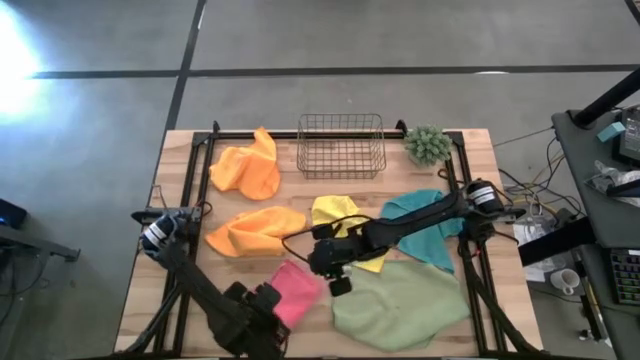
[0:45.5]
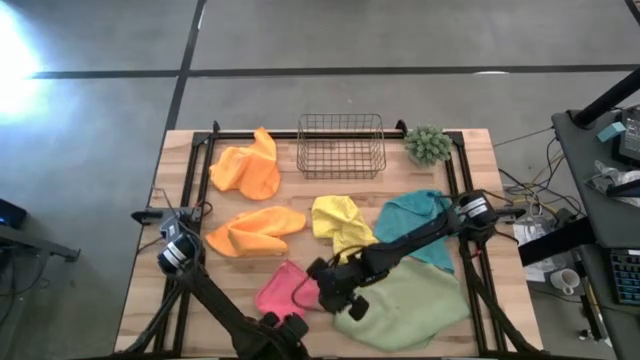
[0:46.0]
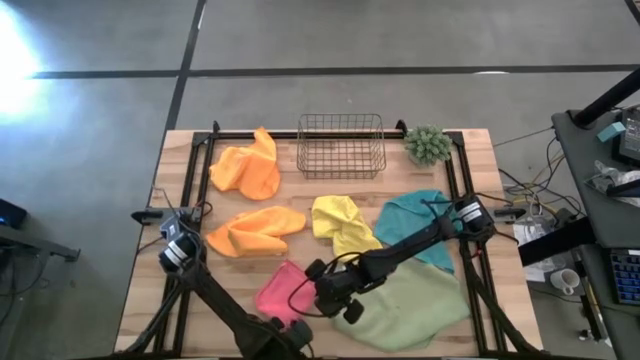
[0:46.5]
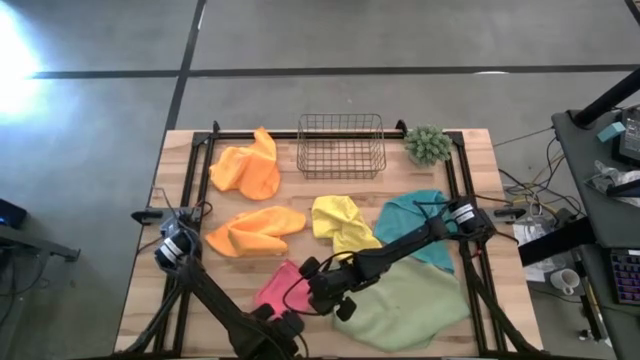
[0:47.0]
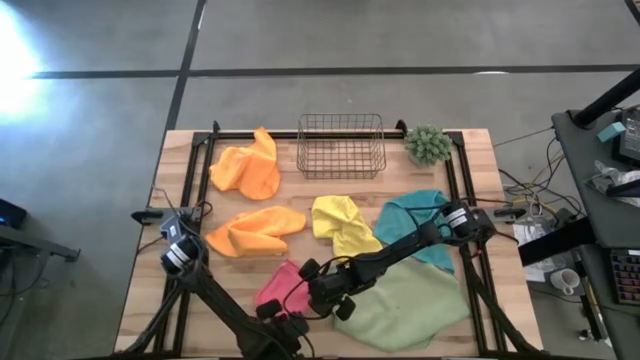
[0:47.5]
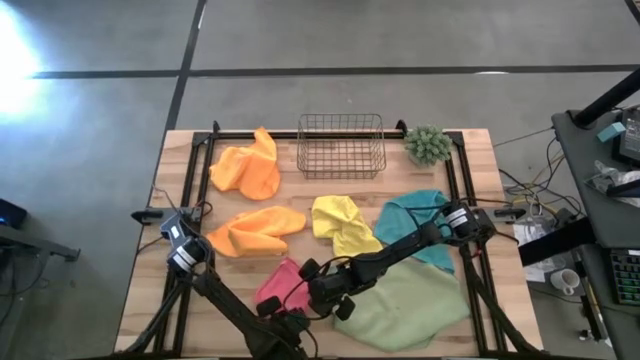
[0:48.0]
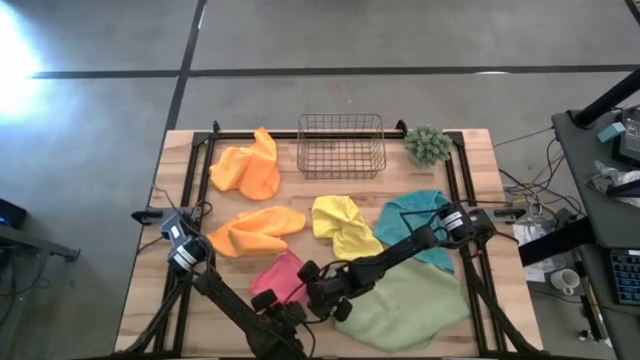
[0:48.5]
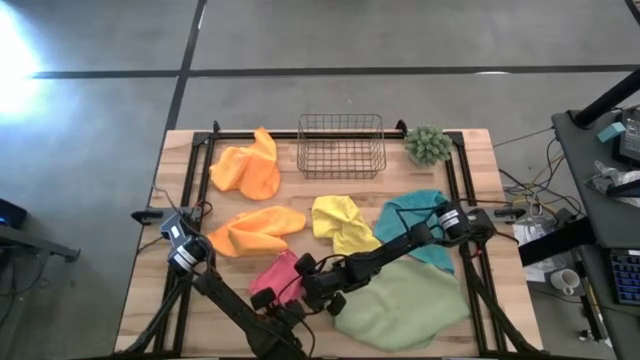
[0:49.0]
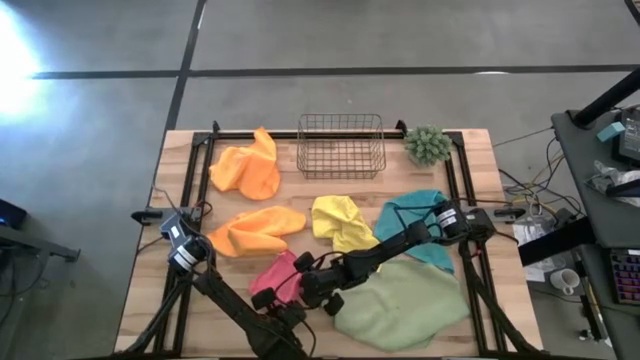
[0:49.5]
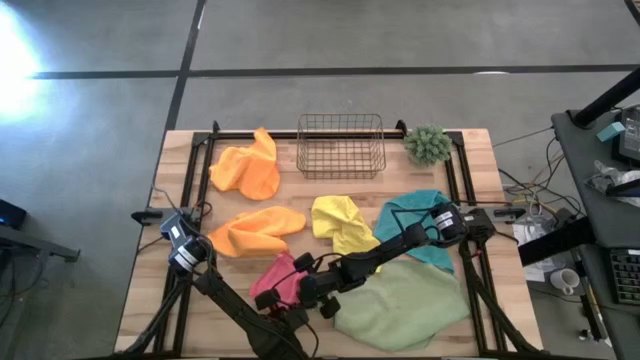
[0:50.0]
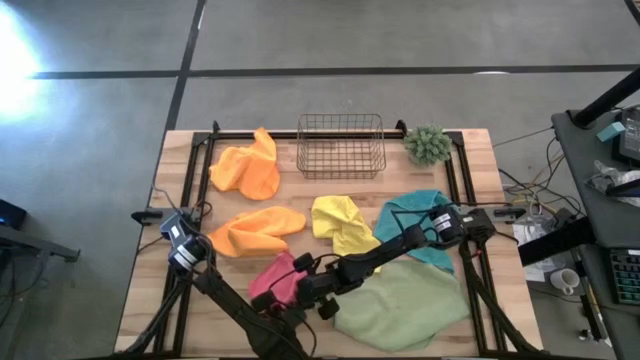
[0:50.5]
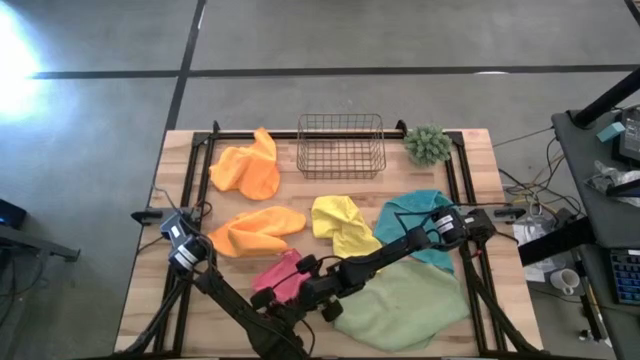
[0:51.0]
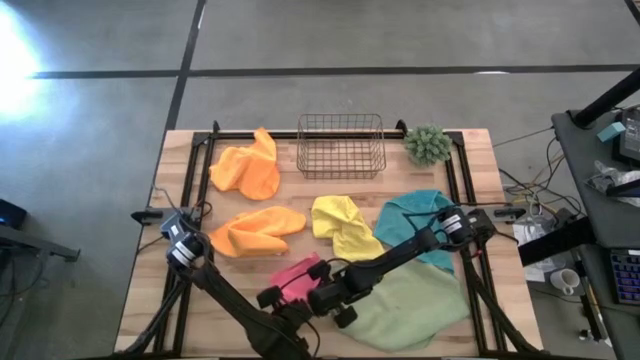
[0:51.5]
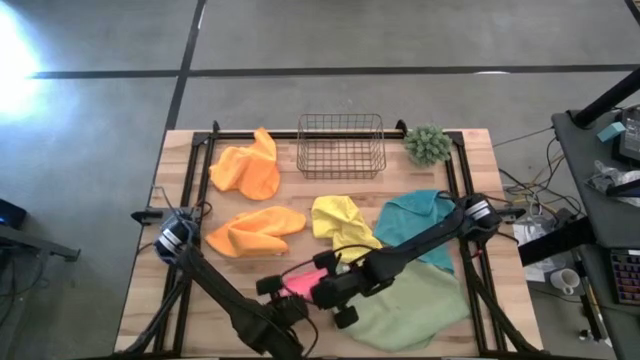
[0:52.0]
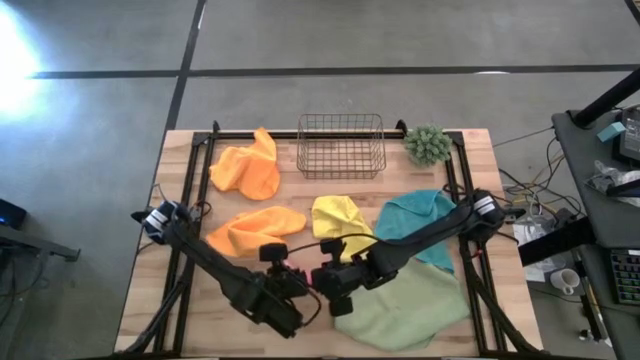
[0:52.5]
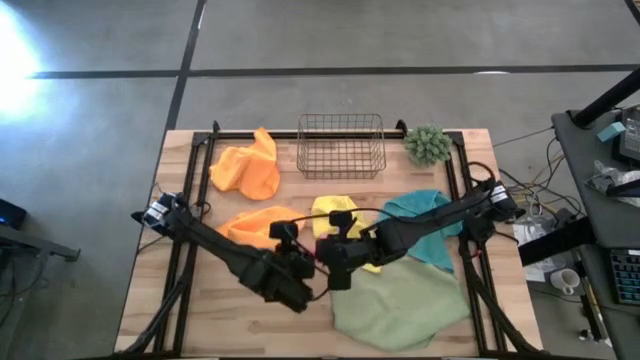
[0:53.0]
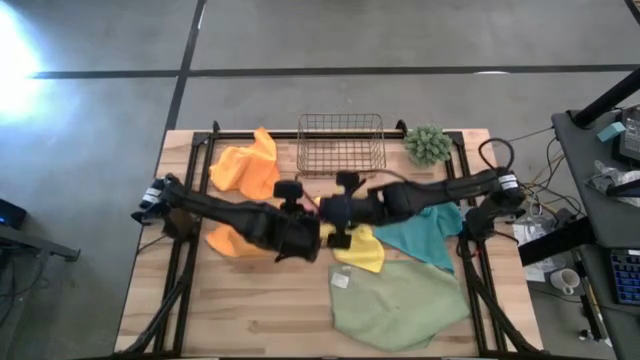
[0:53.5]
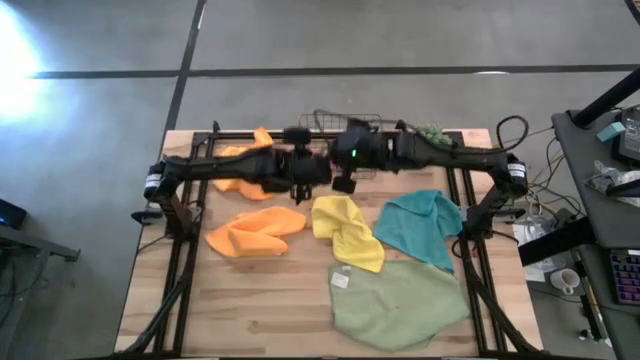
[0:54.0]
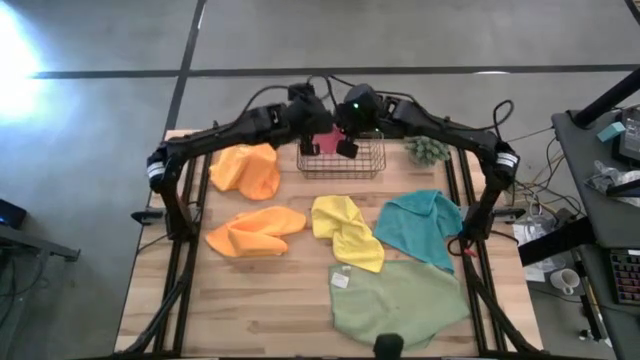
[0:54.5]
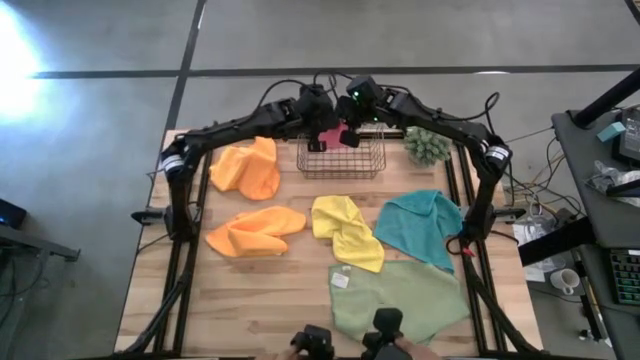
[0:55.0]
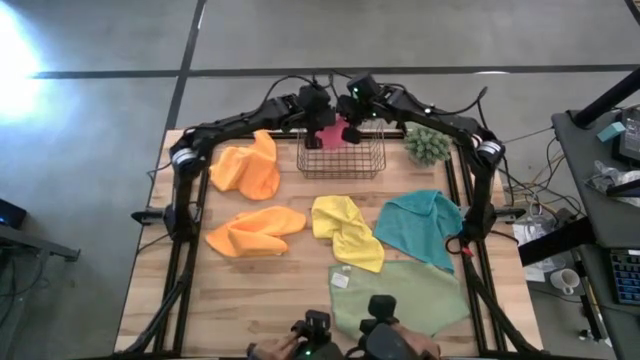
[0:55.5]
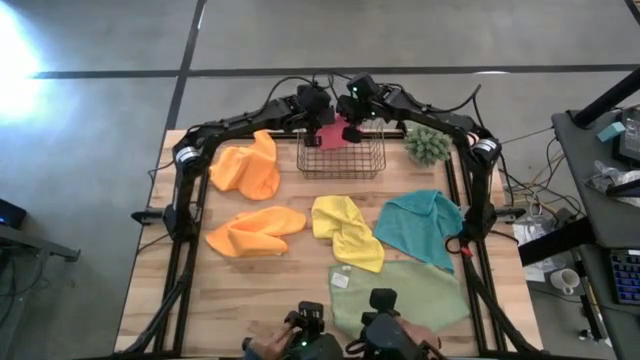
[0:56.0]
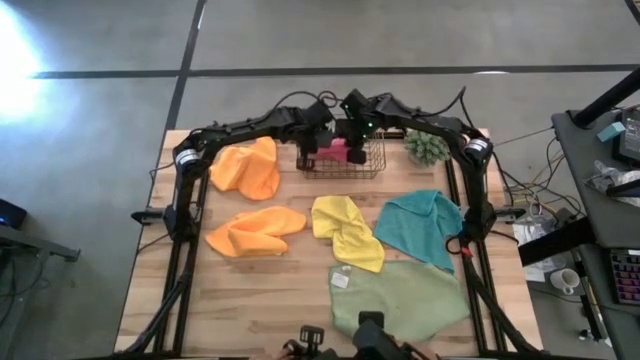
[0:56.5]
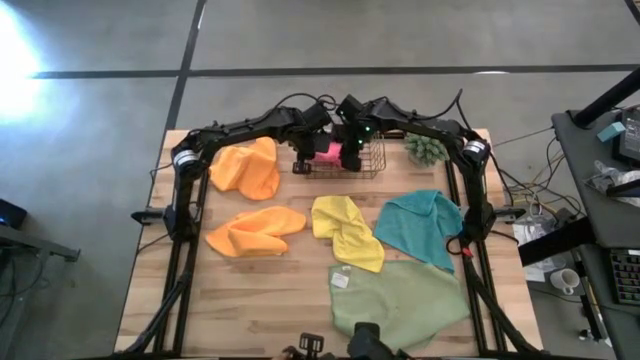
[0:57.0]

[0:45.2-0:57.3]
Task: Fold microfiber towels
Put the folded pink microfiber cloth into the gold wire basket

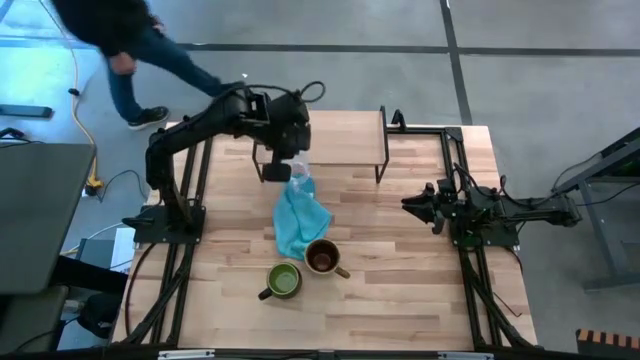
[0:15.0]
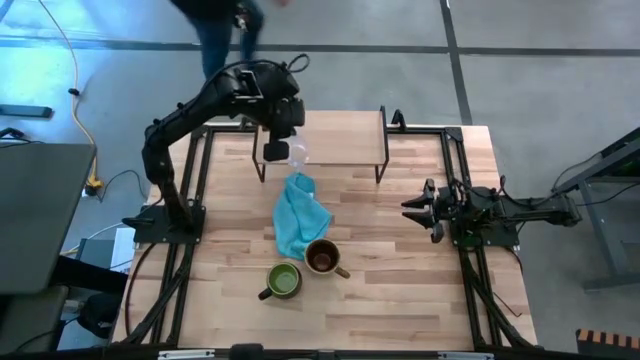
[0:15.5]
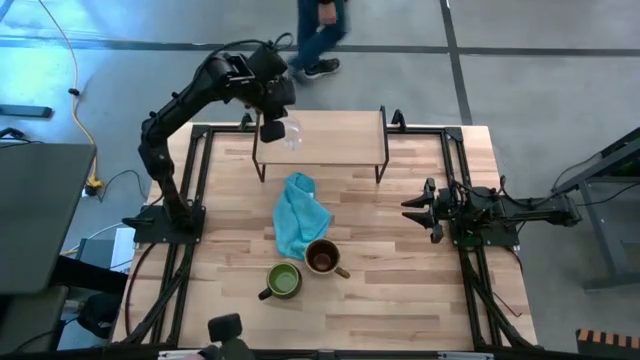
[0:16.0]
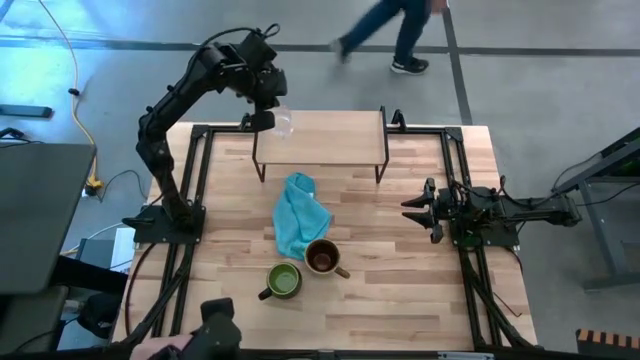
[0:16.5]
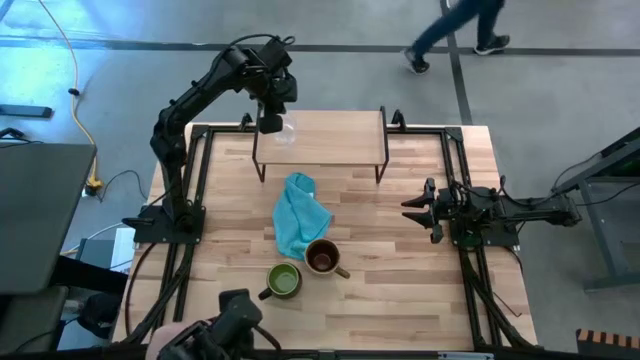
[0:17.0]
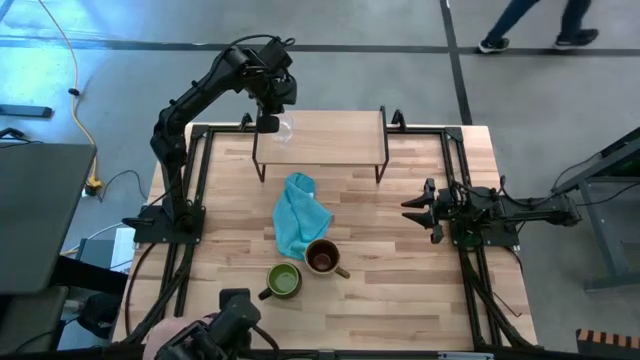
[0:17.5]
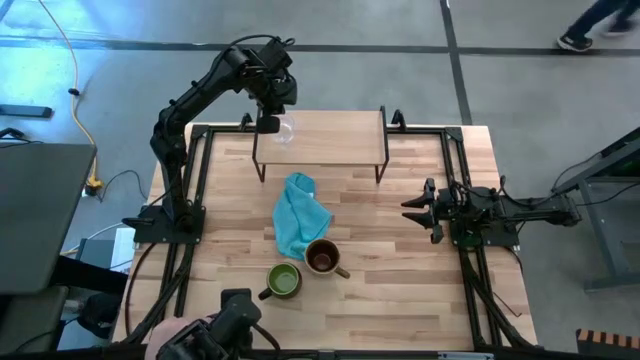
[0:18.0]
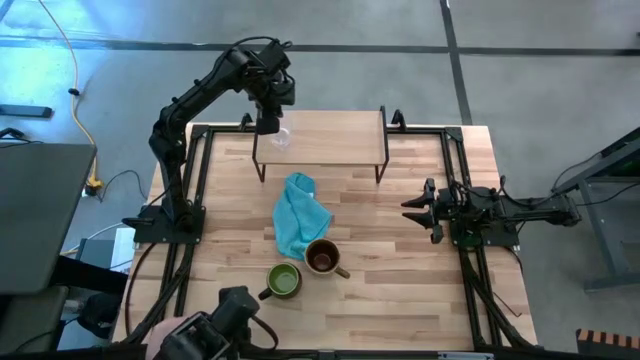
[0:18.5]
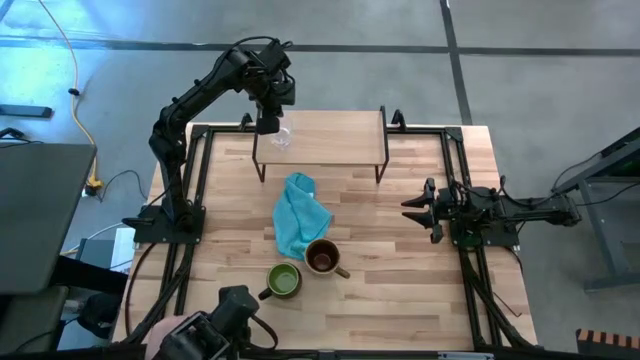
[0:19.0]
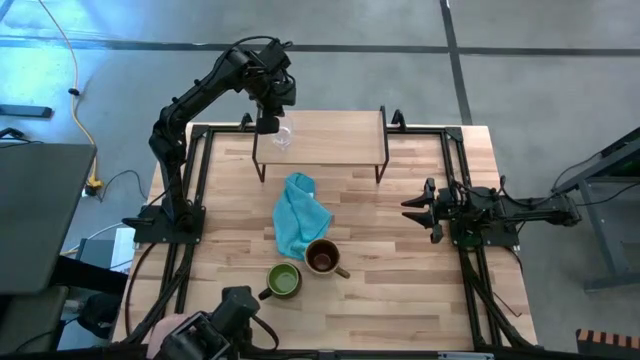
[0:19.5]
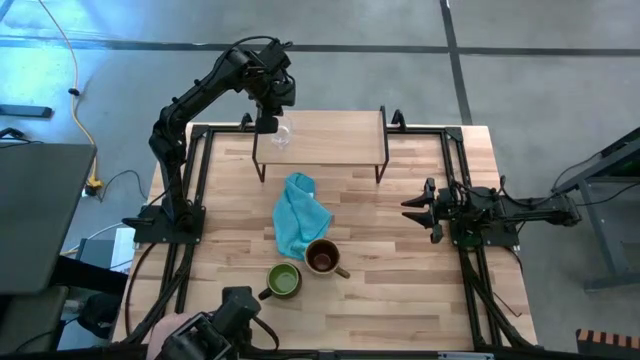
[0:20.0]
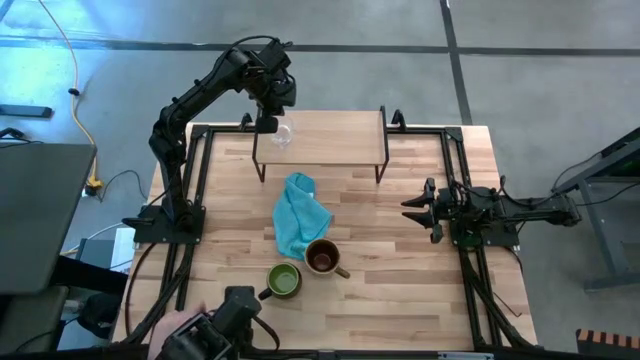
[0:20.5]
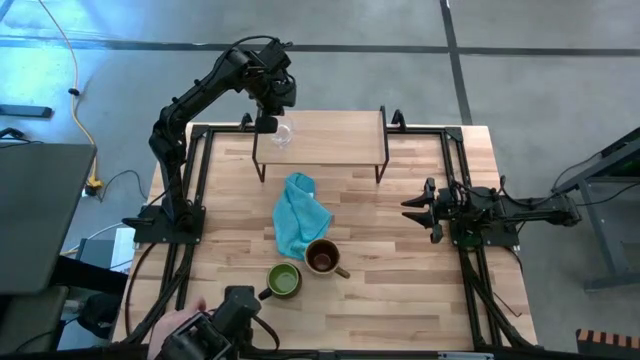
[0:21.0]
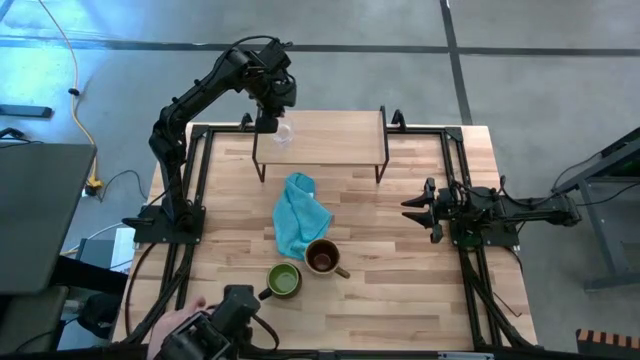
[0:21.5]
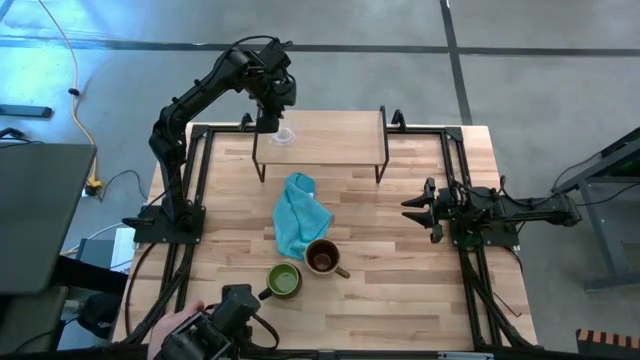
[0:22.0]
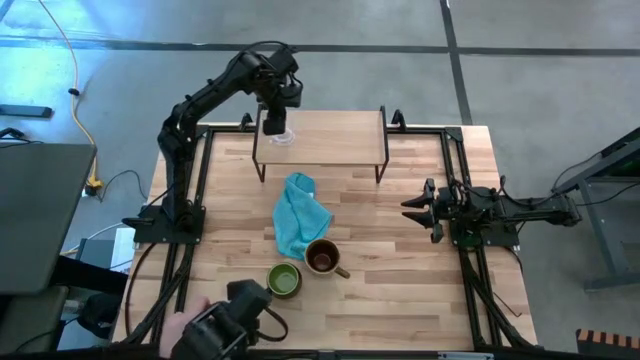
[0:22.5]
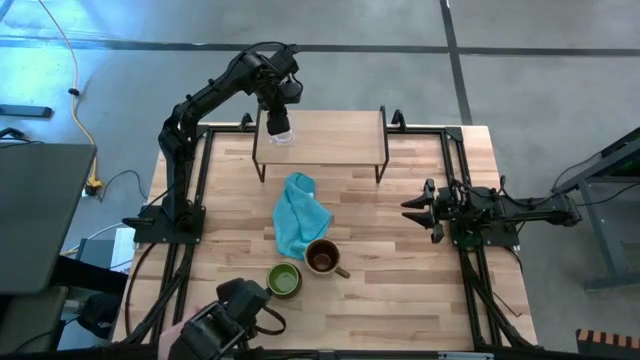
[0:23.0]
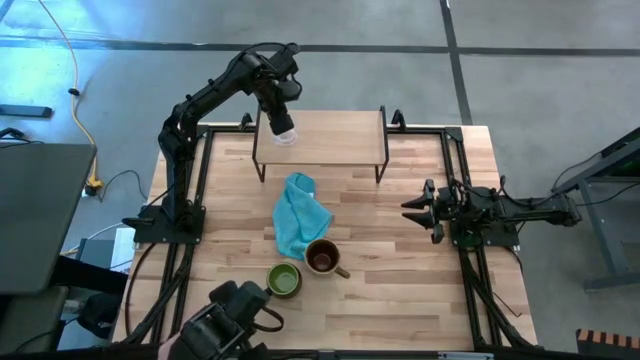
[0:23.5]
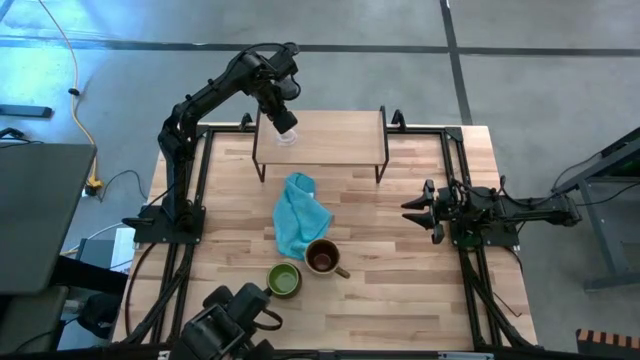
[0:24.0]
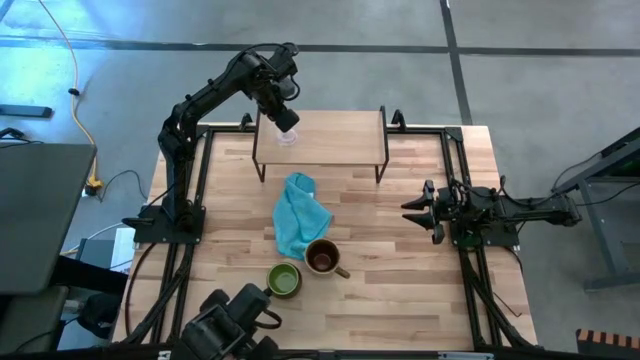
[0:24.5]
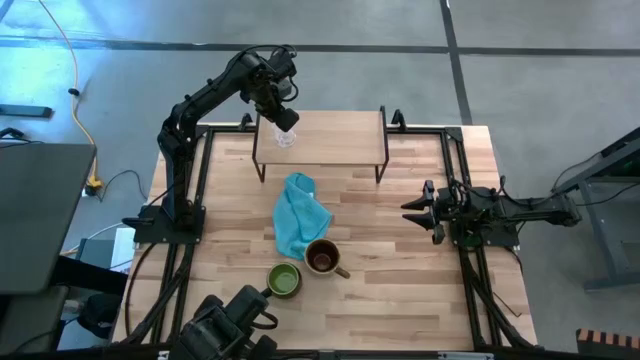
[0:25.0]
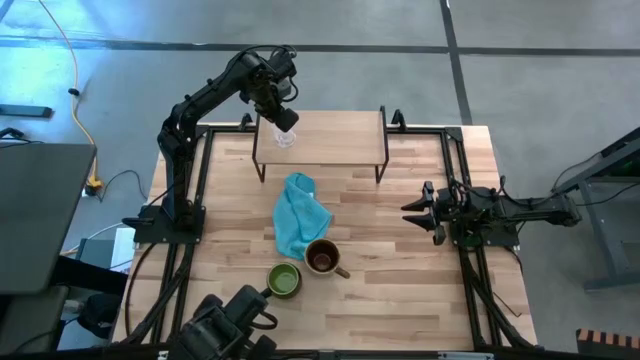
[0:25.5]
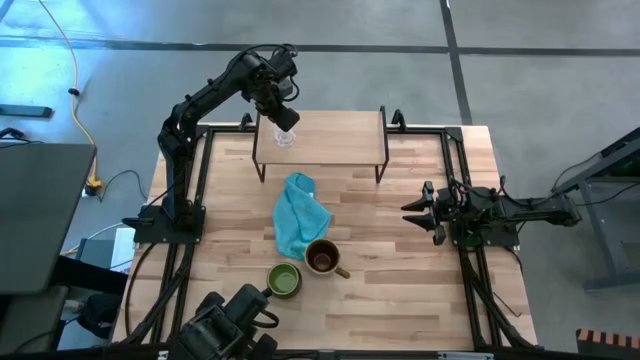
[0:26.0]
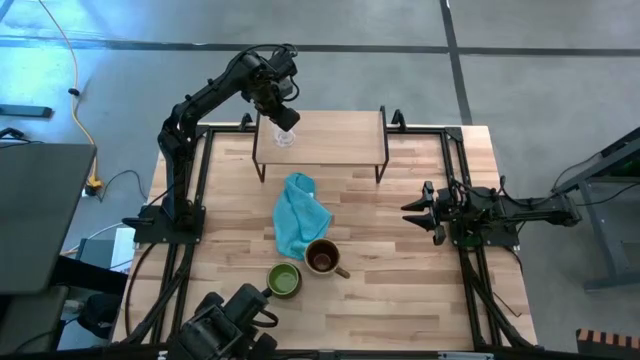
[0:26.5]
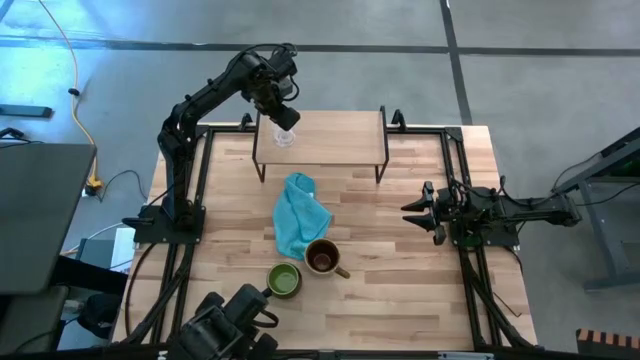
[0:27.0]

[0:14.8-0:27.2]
Task: Stack small to large cups/mugs on shelf
Put the transparent mug on the shelf
